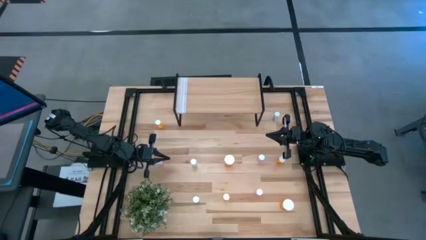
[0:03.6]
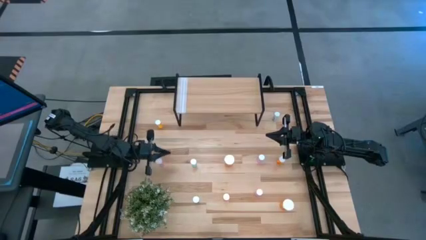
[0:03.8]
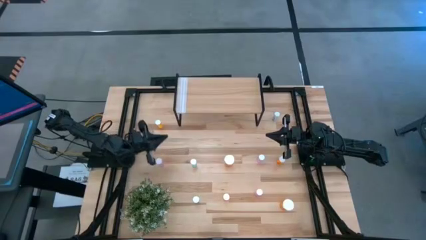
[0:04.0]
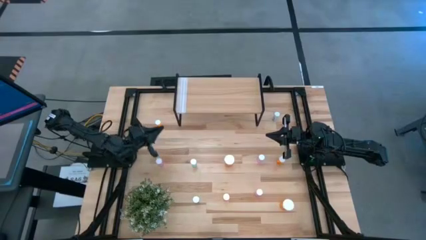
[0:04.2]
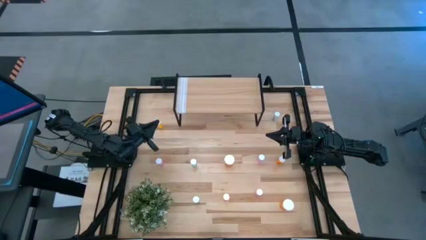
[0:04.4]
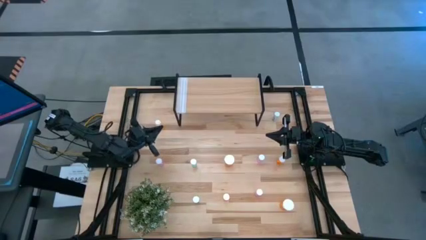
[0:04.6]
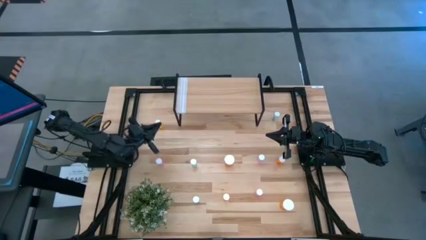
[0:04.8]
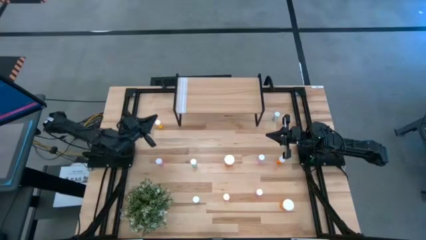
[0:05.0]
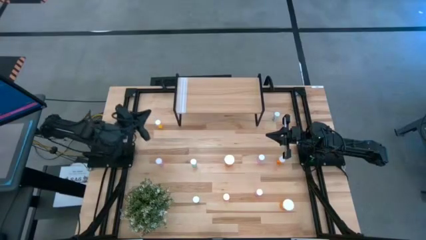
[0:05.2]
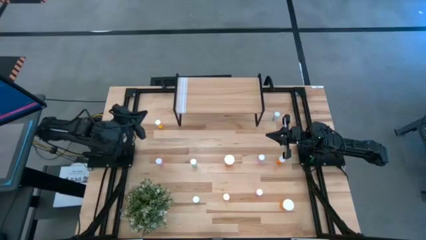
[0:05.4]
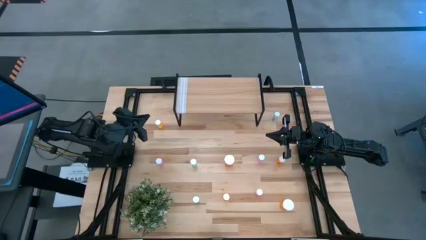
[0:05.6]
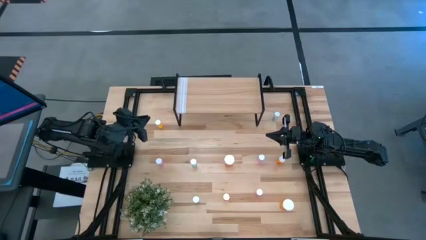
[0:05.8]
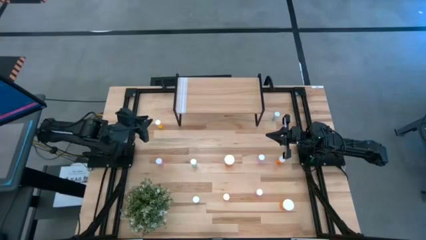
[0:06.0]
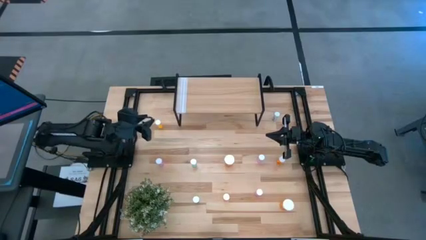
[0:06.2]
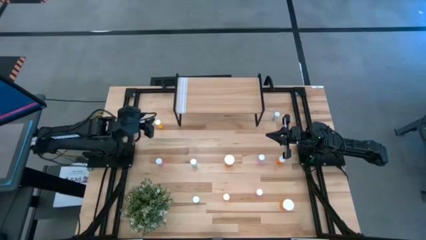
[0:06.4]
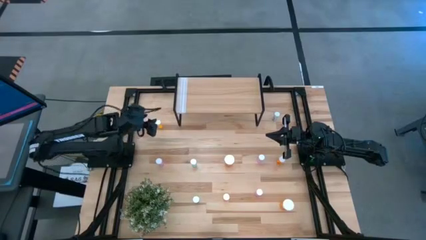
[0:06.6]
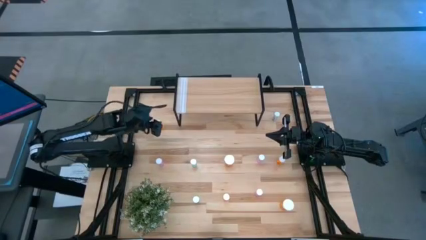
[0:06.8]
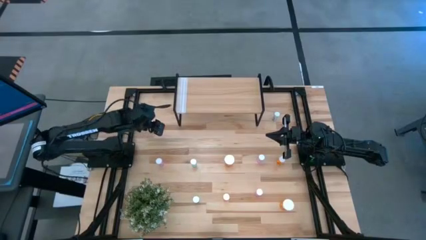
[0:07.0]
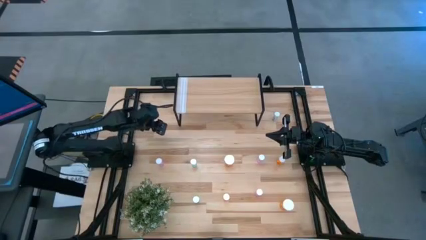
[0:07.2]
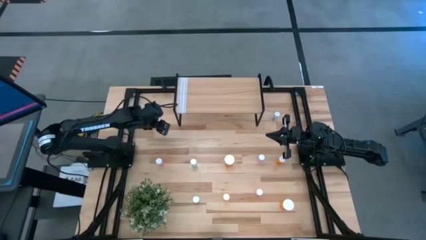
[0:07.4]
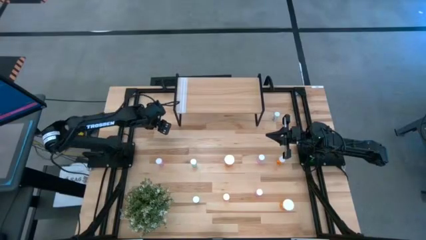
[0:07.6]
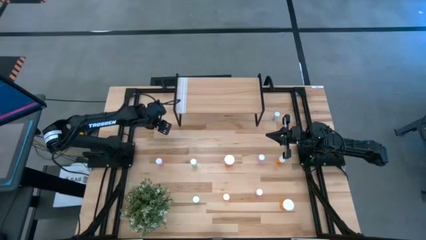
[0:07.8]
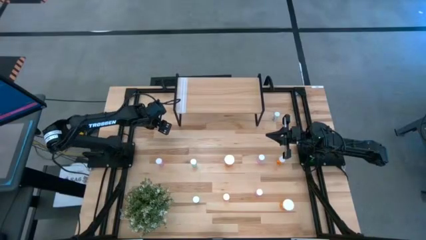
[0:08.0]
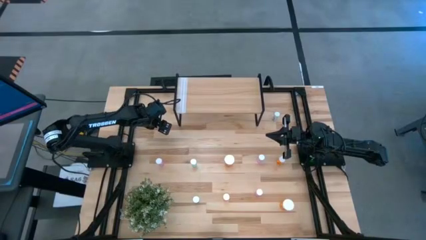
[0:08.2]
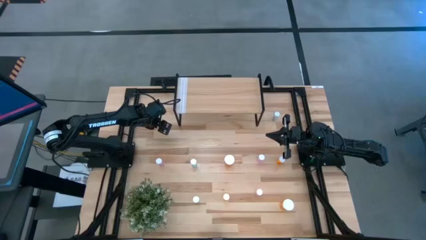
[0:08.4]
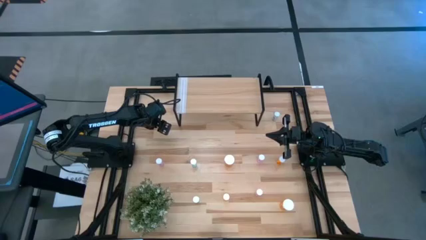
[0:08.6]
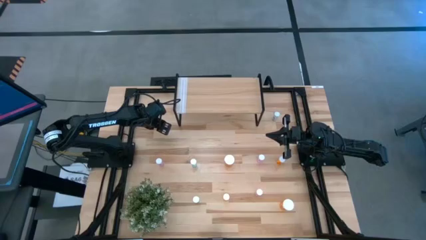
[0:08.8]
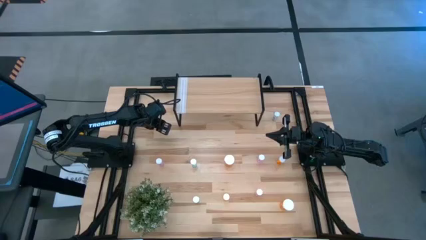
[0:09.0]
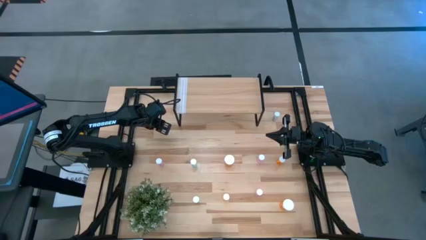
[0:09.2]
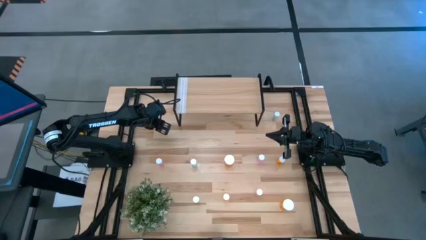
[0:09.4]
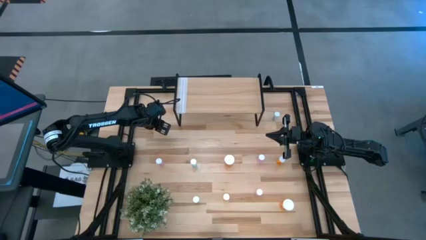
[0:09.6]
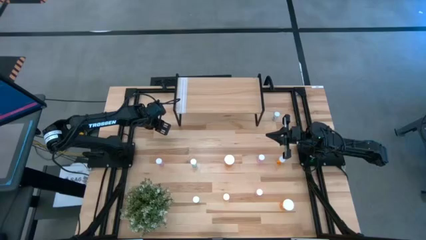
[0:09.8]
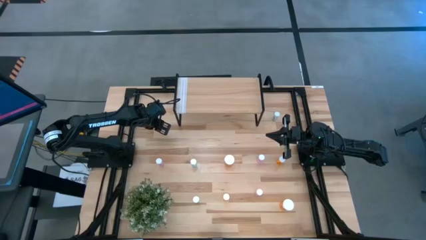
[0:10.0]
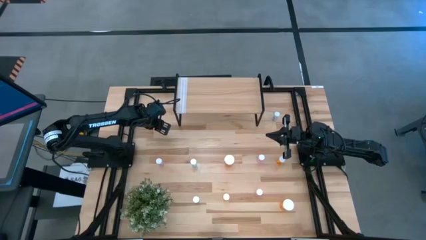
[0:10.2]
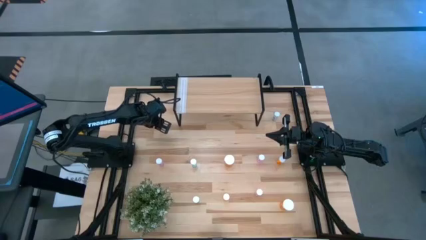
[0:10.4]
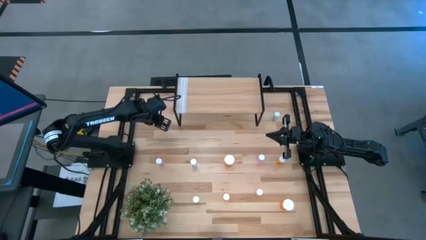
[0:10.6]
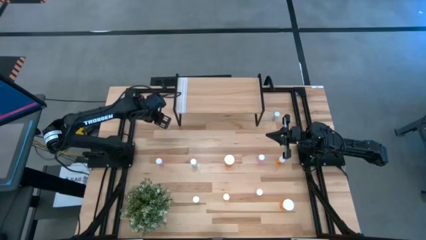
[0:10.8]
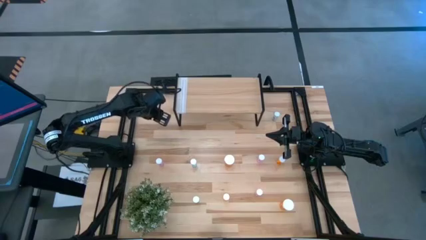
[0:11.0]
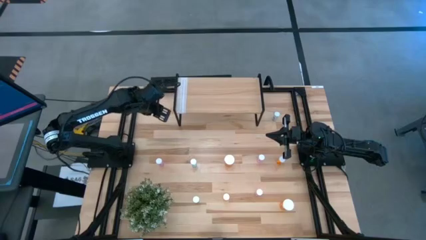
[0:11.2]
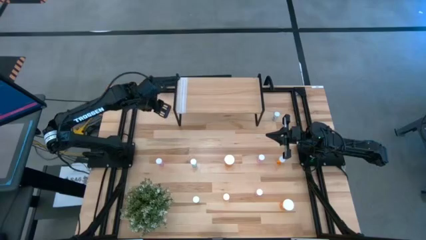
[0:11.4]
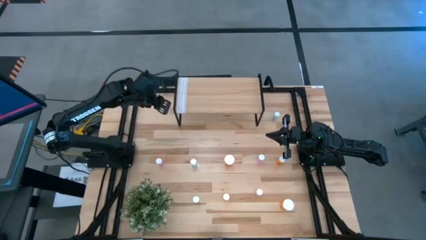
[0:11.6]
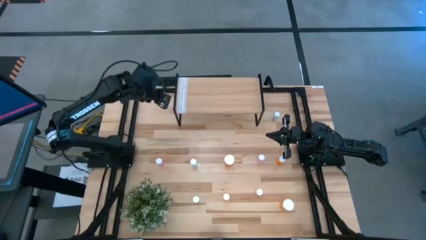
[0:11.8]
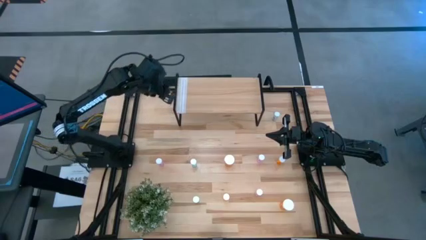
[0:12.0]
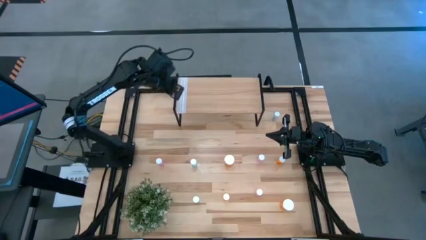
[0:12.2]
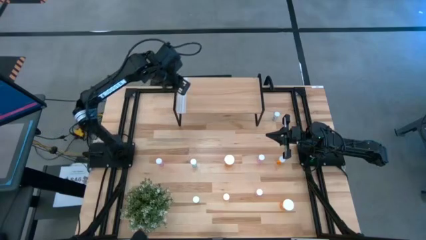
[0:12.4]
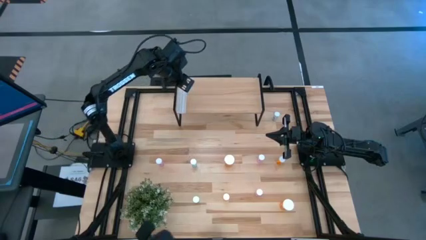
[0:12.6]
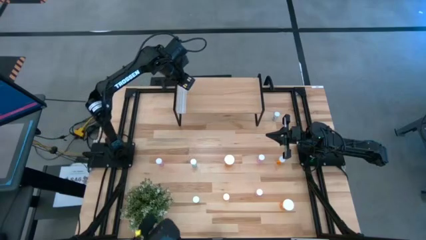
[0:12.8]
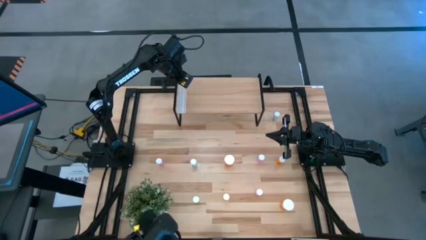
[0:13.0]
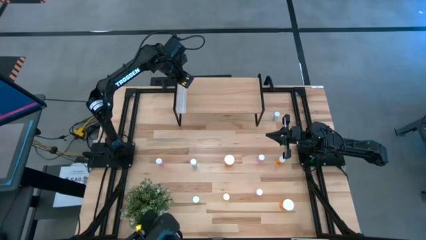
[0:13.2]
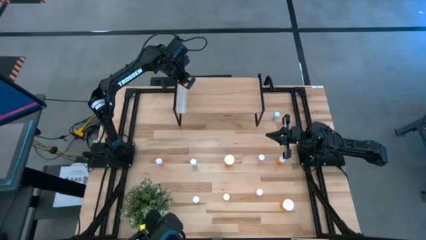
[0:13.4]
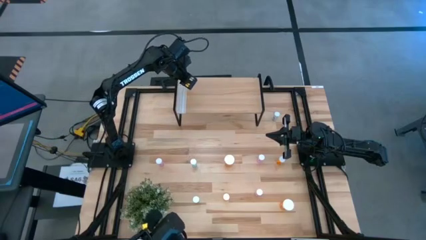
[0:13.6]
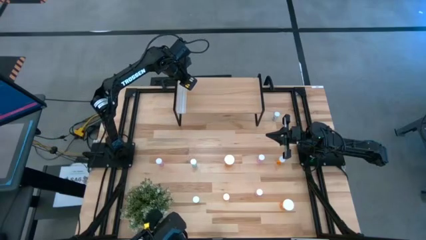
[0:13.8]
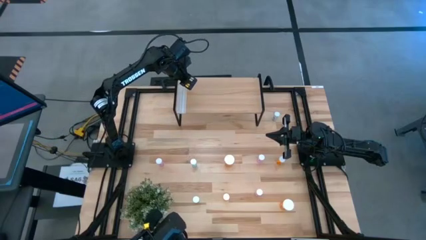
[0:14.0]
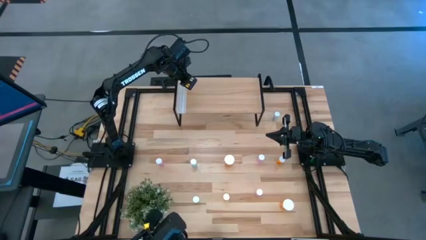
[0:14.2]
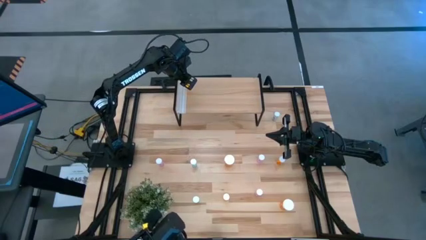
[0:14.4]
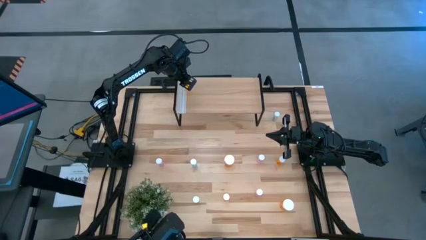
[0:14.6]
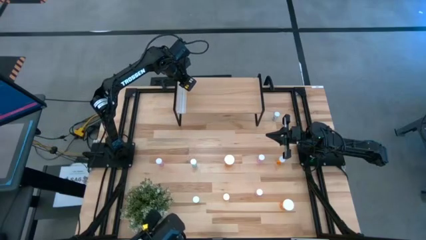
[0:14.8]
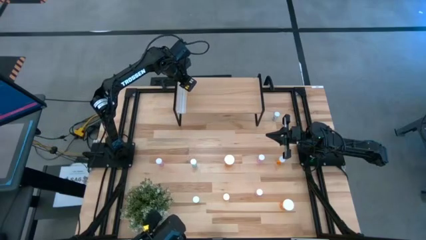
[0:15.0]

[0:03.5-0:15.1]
Task: Pick and place medicine bottles onto shelf by color
Put the light orange pill bottle on the shelf
